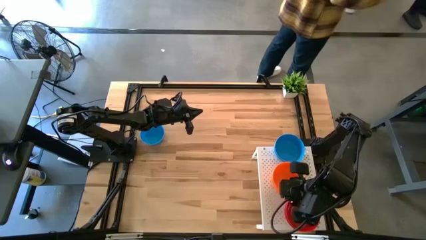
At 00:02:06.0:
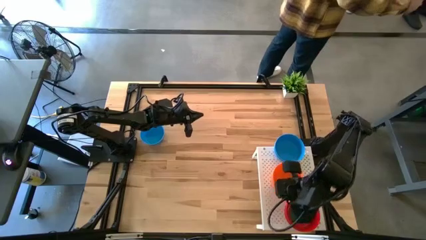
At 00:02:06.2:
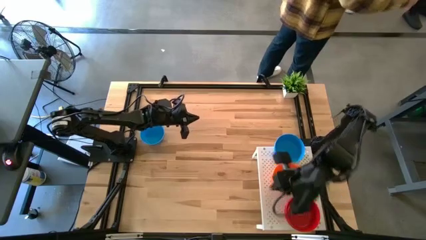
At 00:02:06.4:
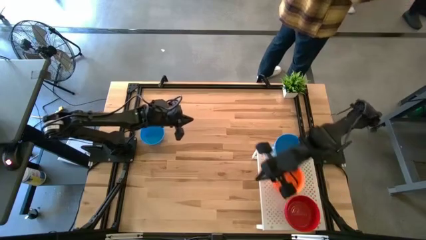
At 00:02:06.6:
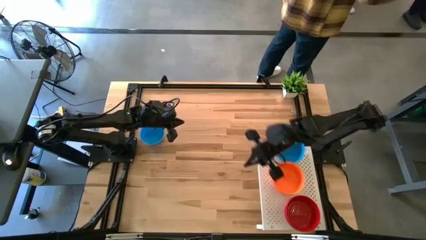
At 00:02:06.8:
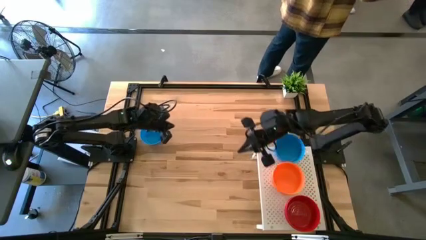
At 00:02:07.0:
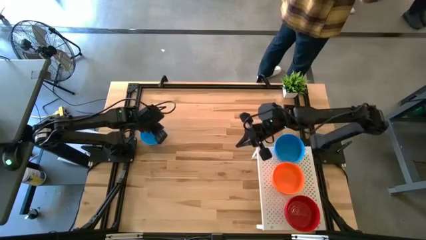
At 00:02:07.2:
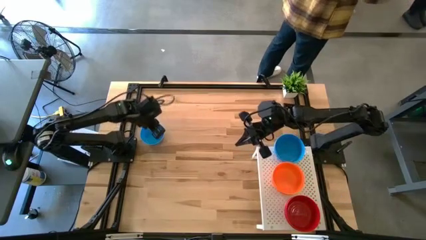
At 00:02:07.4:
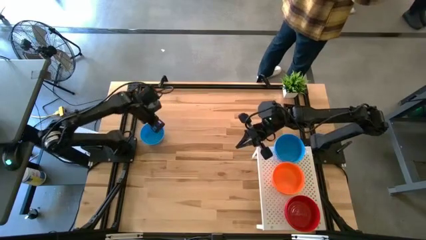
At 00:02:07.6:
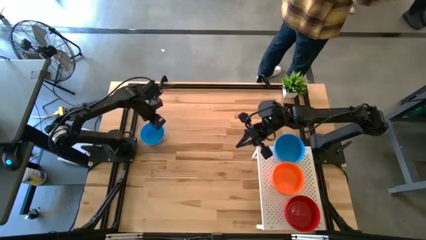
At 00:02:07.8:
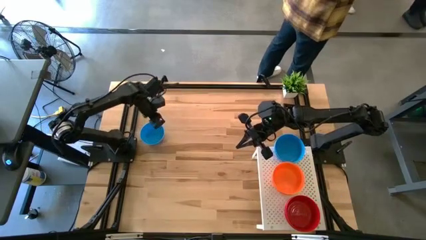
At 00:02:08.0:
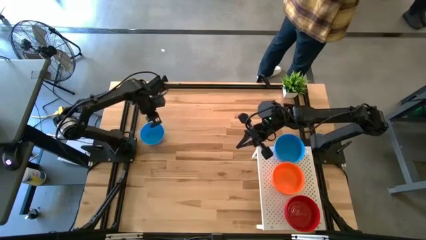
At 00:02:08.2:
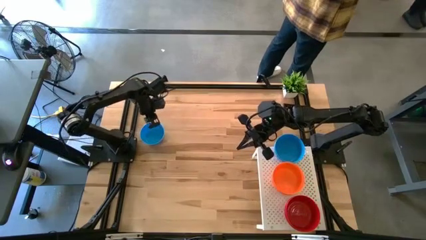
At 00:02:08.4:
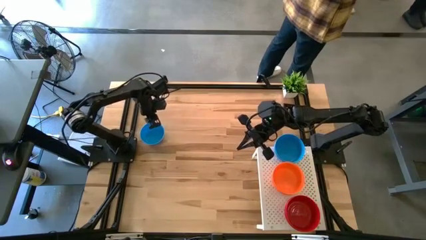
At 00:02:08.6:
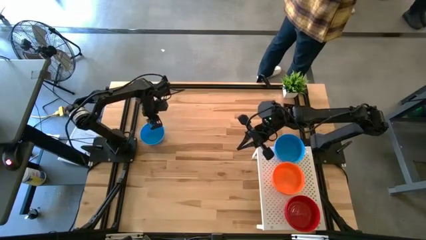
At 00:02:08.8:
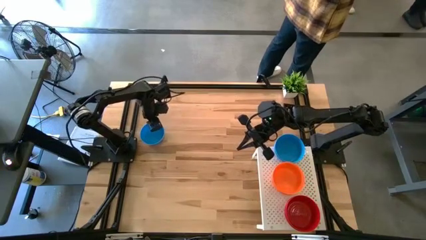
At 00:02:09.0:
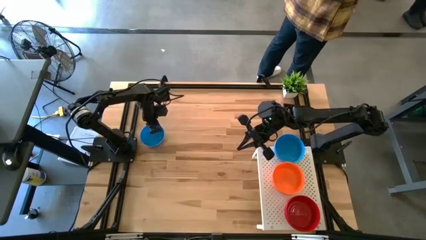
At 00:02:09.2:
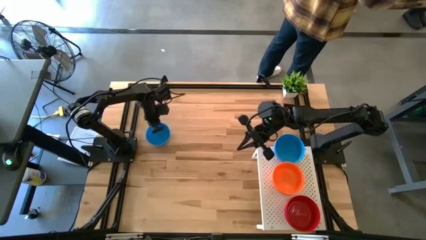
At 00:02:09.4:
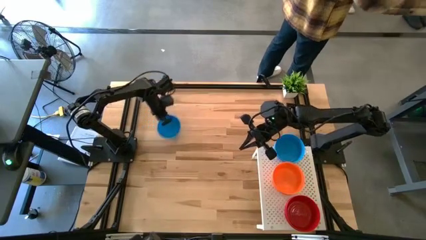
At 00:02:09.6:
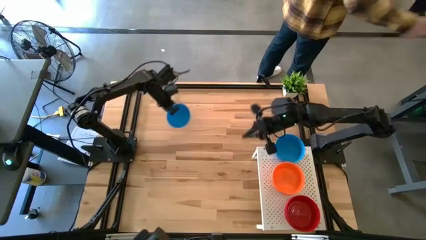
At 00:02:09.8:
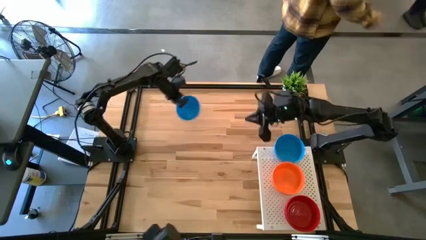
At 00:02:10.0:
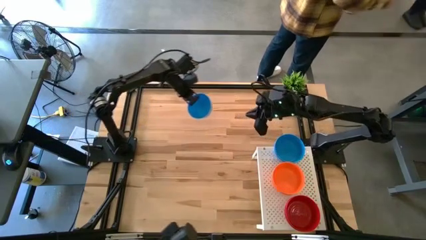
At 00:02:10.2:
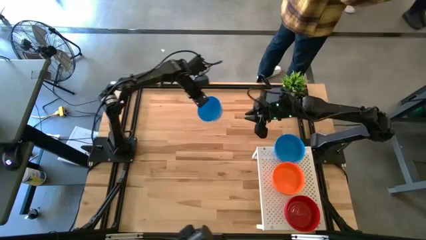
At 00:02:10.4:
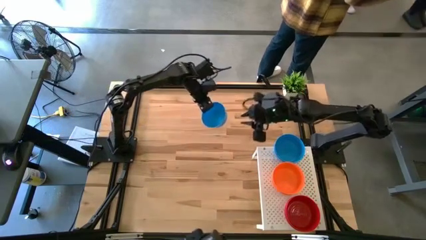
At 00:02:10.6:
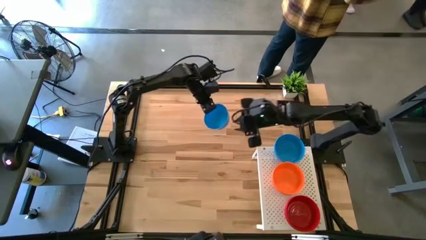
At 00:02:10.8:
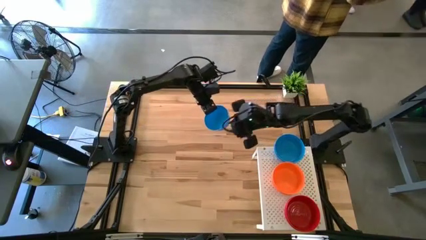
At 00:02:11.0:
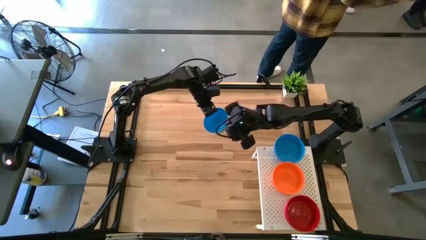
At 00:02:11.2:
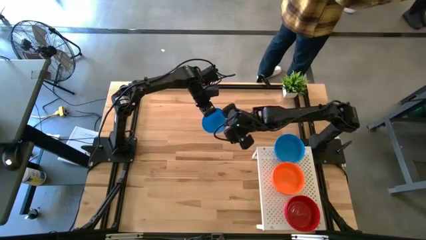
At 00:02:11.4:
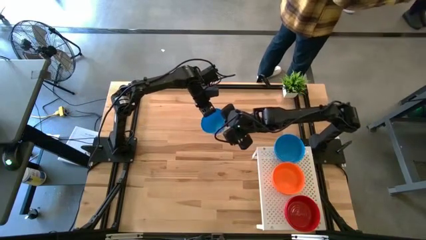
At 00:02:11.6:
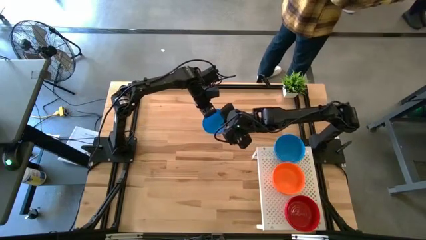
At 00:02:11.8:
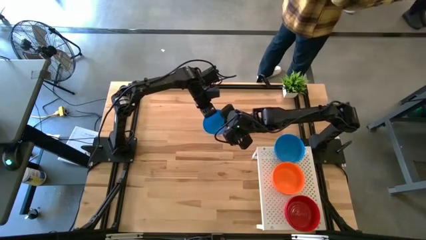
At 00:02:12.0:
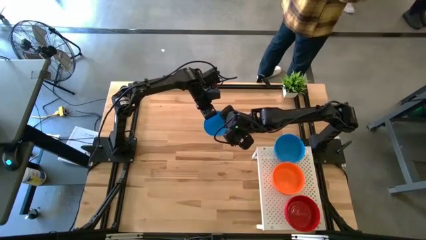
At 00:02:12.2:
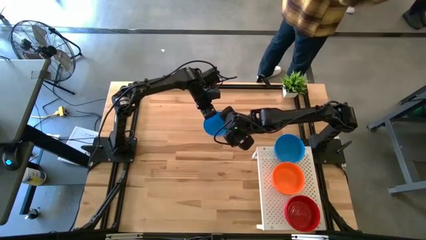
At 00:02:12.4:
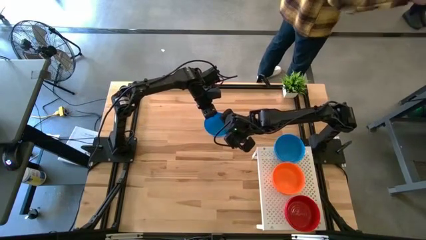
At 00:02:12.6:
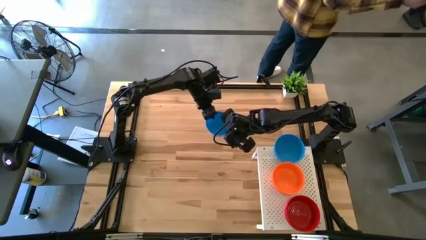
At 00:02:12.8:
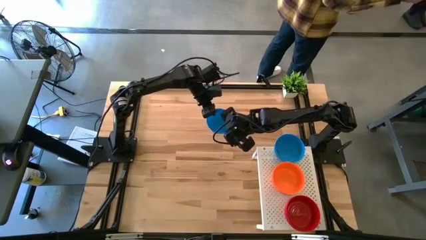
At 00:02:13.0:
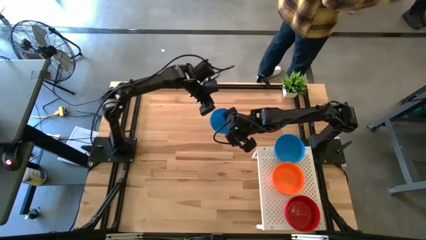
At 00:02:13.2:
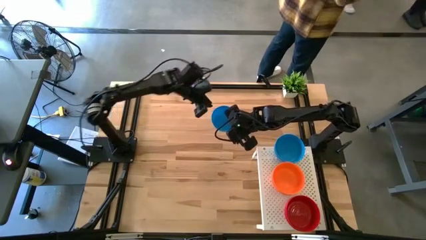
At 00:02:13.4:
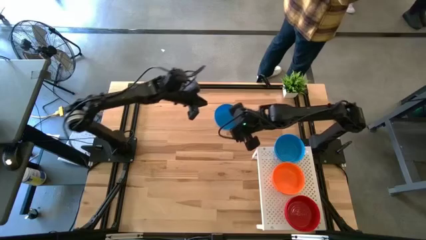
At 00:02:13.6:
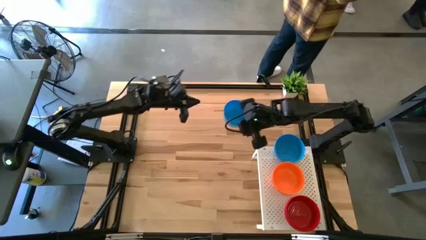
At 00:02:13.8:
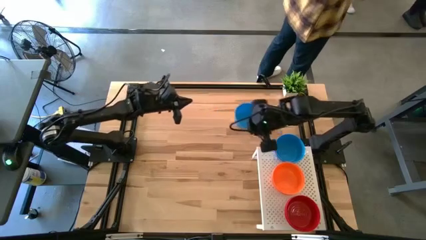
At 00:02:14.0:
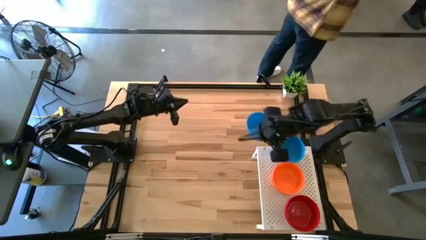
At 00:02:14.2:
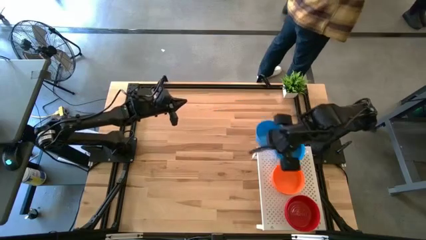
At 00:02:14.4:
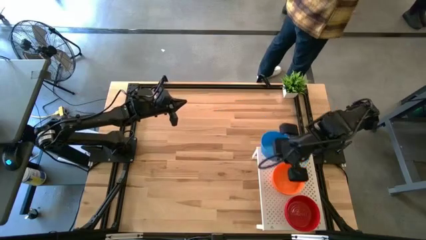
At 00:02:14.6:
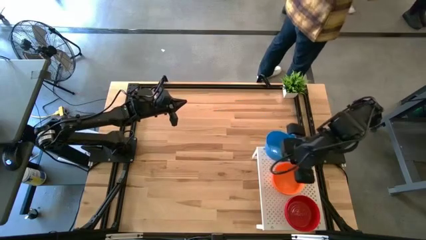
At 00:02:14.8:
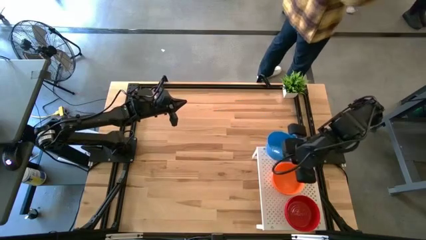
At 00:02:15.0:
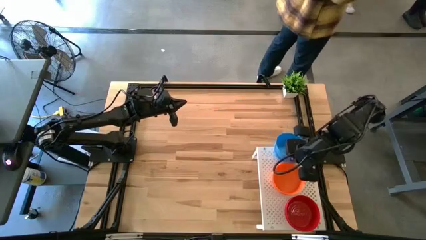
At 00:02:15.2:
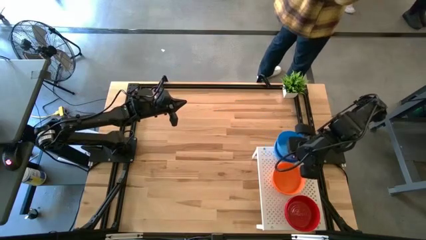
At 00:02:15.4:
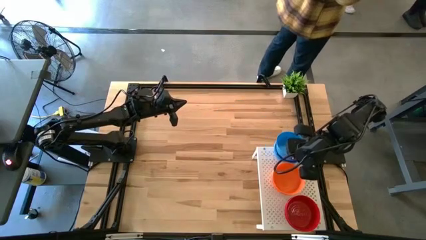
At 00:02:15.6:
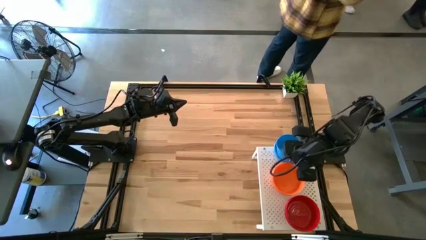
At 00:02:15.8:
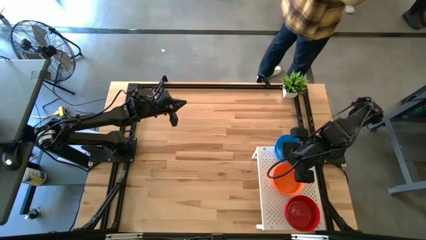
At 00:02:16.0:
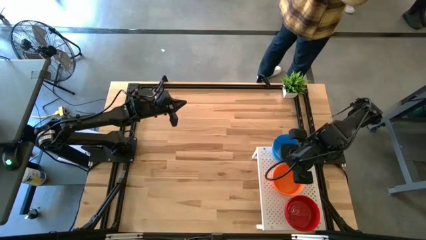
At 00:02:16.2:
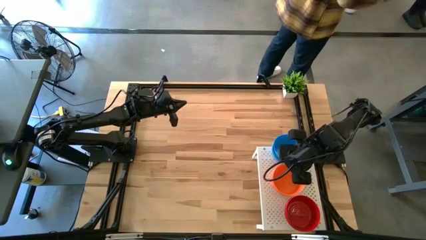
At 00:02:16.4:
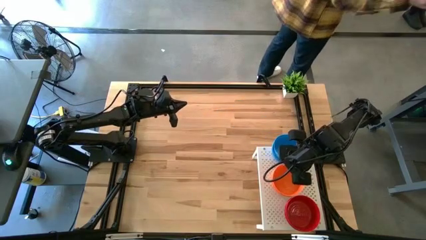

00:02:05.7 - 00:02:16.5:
Task: Pick & Place Mini bowls
Stack the blue bowl on top of the other blue bowl on the shelf

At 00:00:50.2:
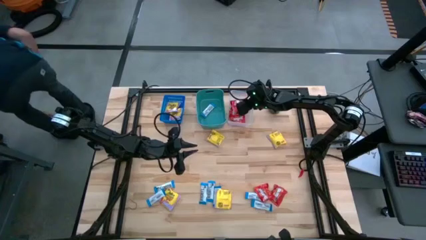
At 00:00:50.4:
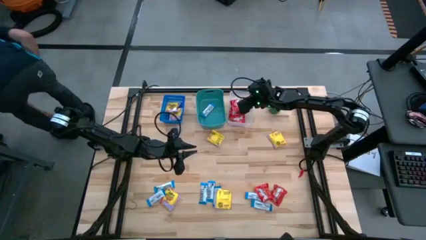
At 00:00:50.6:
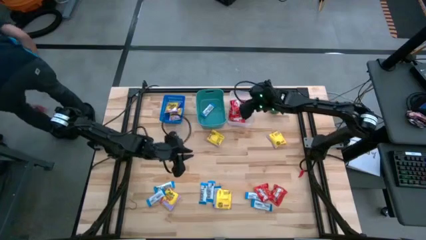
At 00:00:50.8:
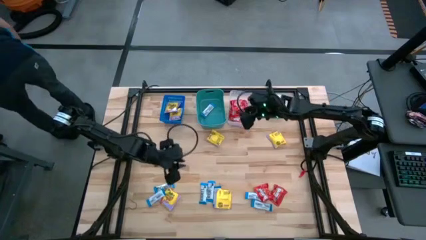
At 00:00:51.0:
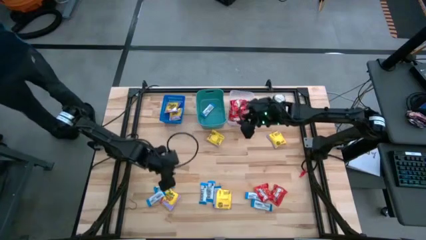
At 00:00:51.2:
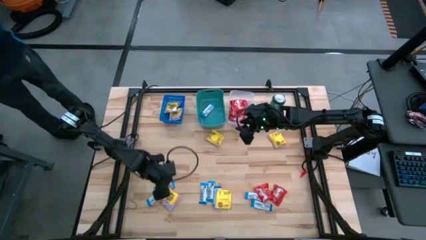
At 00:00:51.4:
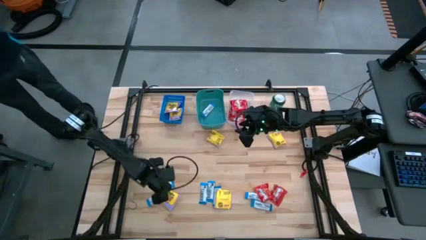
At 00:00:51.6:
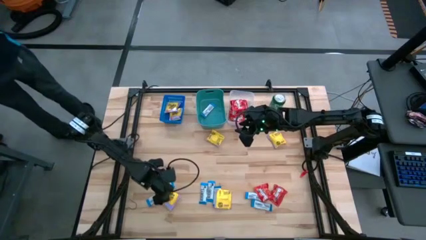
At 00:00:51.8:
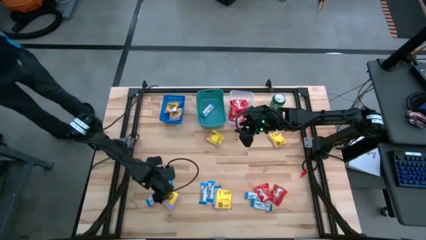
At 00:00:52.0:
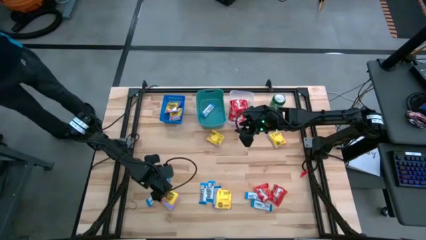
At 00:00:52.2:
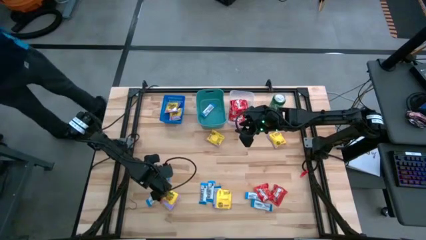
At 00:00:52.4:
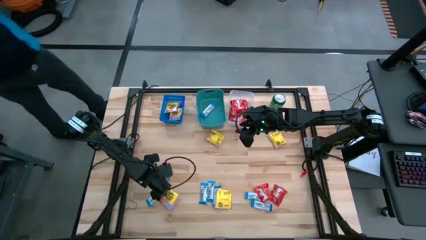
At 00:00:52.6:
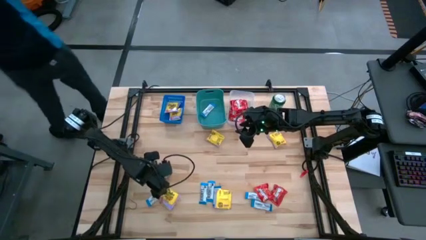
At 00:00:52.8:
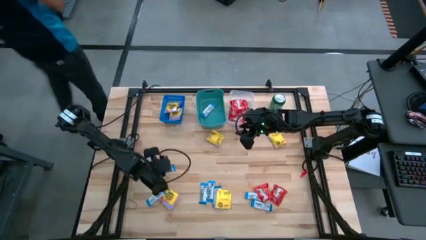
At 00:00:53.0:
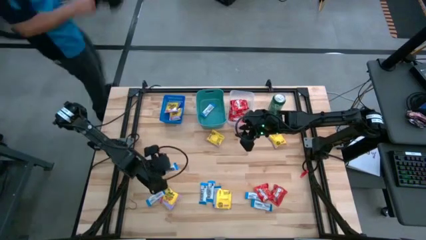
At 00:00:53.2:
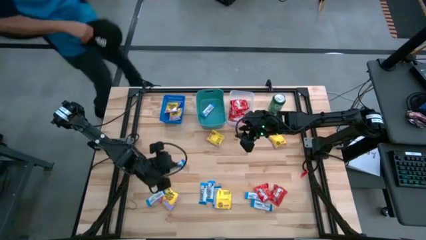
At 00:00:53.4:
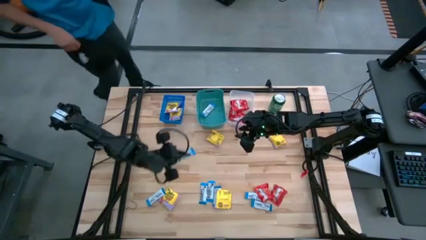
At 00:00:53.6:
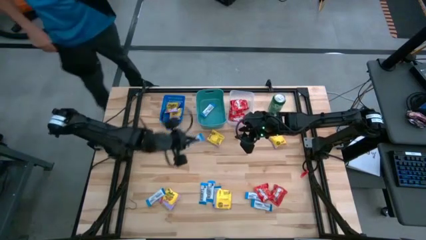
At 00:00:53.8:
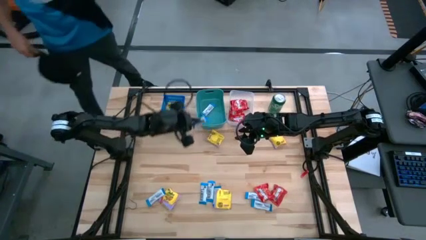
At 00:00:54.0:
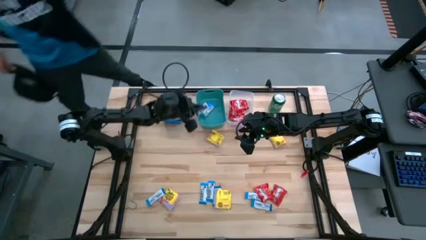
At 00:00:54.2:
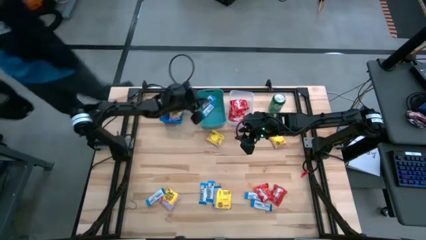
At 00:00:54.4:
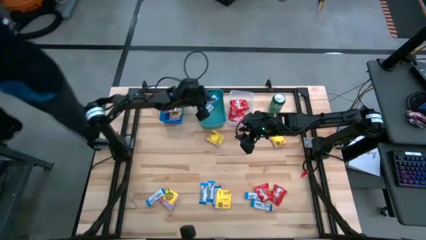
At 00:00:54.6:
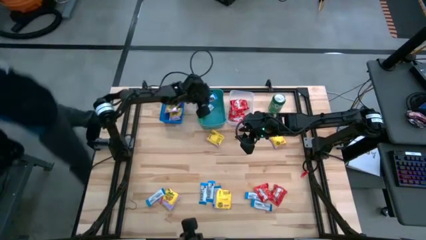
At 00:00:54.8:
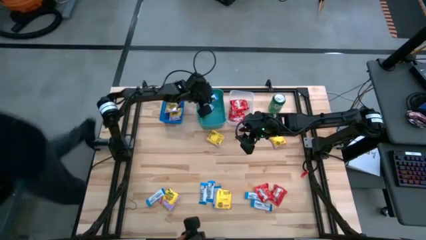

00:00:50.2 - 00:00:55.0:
Task: Sort candy
Put the white chocolate bar into the green bin
